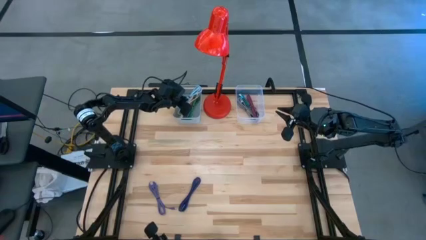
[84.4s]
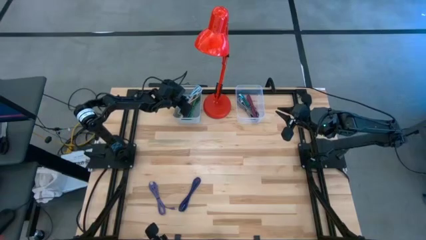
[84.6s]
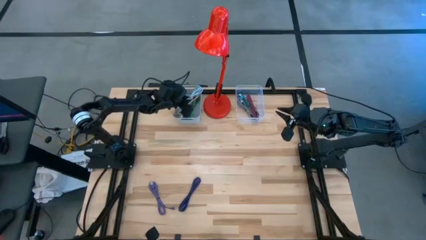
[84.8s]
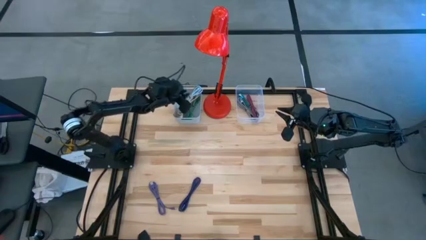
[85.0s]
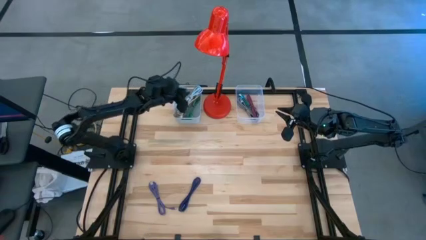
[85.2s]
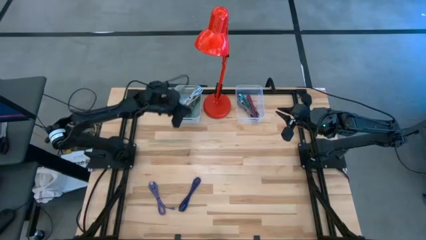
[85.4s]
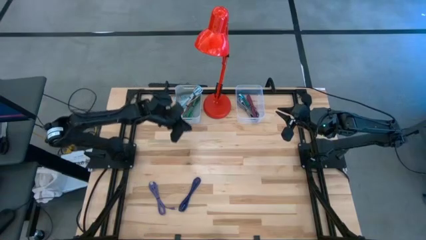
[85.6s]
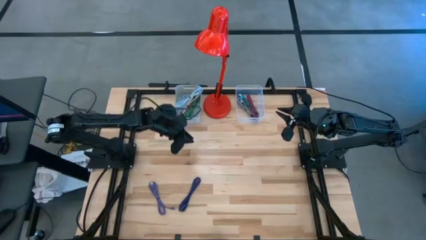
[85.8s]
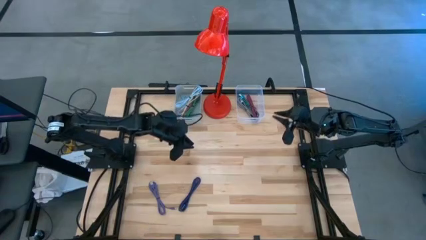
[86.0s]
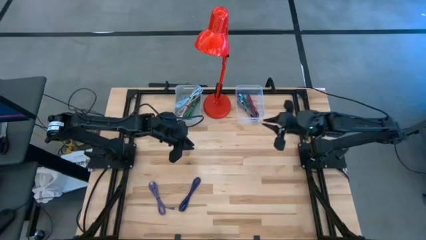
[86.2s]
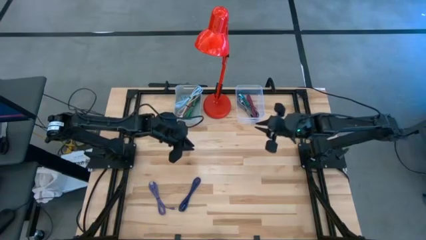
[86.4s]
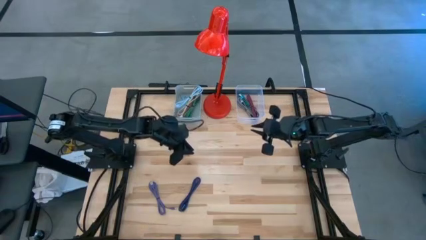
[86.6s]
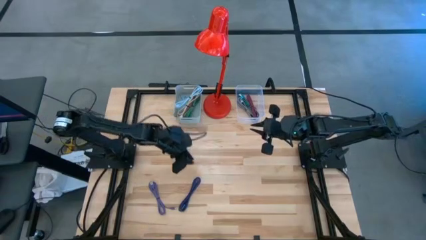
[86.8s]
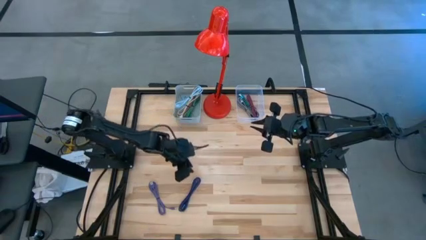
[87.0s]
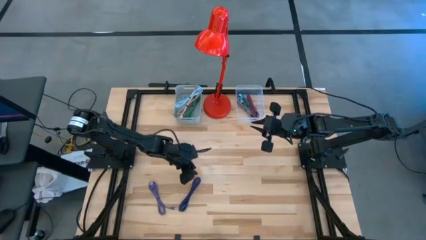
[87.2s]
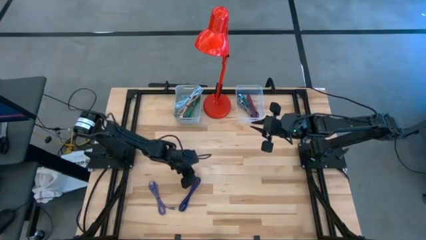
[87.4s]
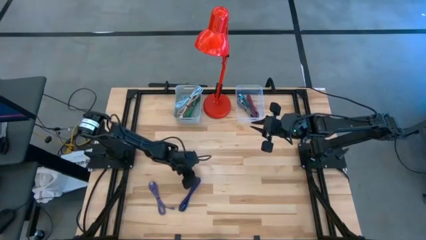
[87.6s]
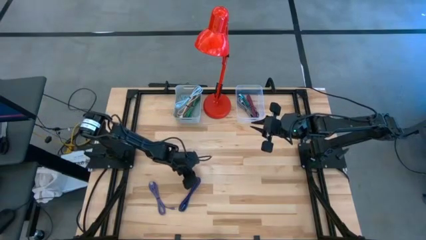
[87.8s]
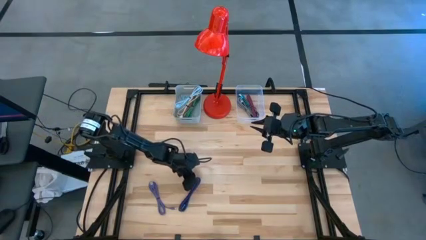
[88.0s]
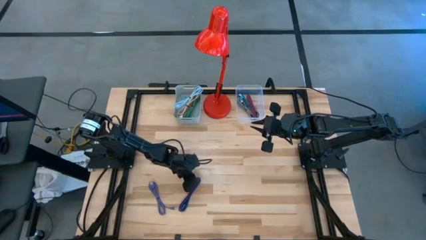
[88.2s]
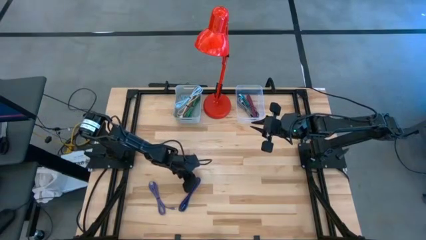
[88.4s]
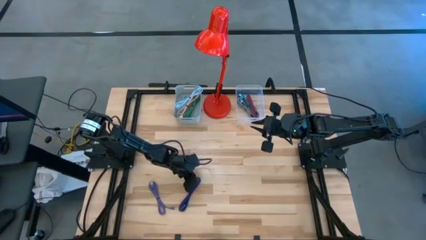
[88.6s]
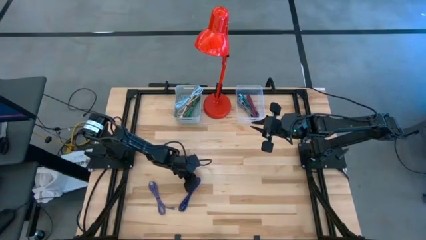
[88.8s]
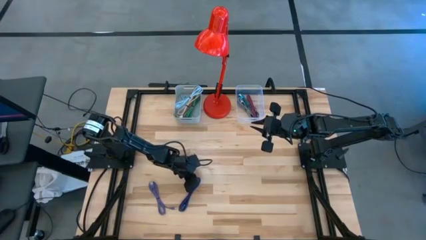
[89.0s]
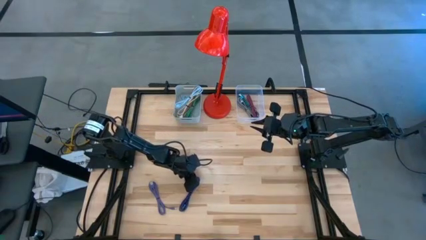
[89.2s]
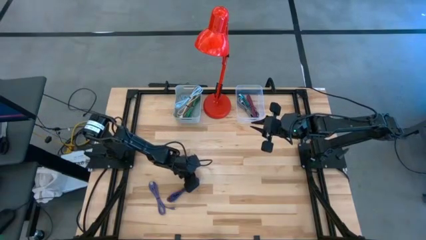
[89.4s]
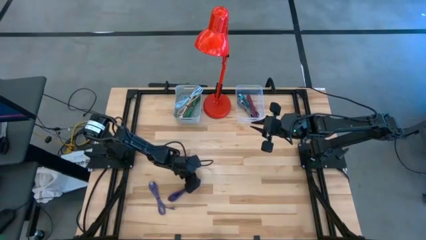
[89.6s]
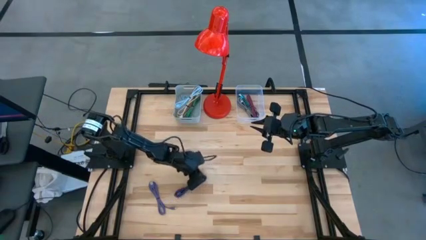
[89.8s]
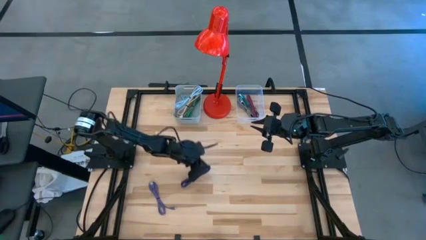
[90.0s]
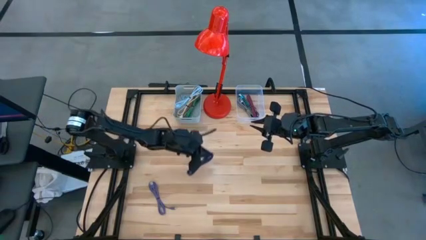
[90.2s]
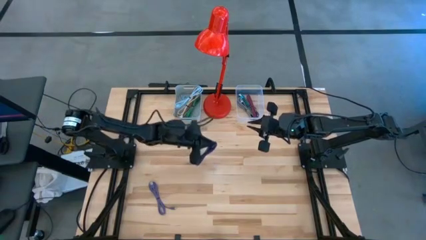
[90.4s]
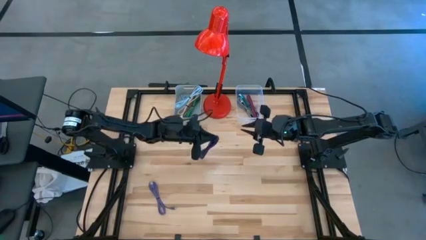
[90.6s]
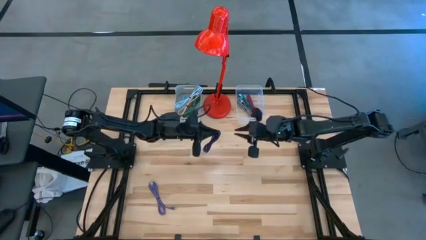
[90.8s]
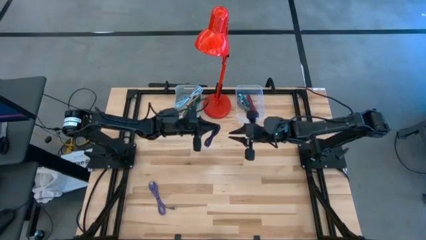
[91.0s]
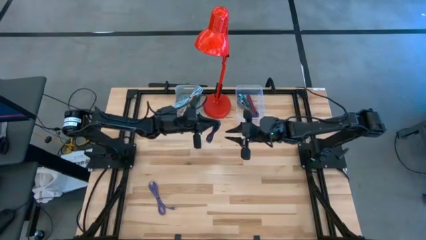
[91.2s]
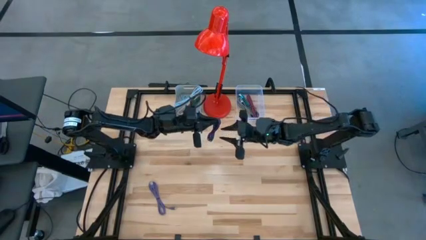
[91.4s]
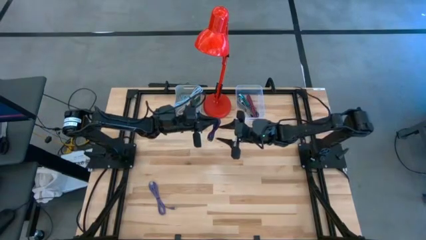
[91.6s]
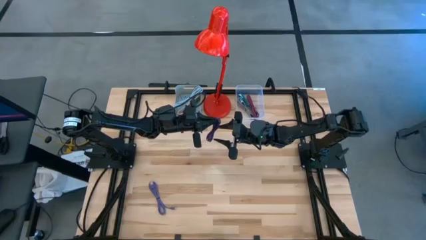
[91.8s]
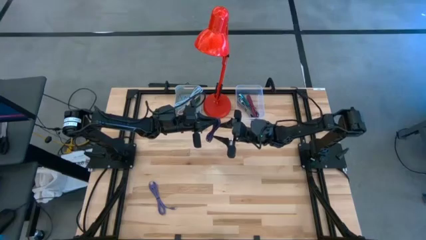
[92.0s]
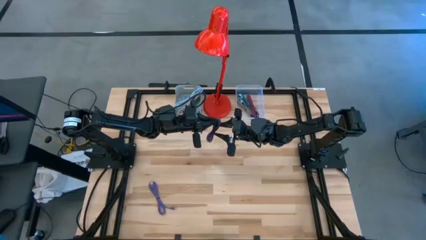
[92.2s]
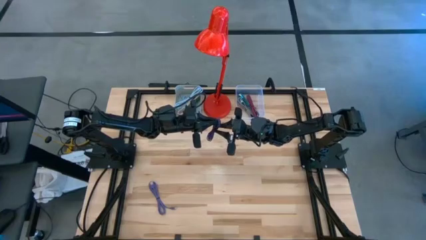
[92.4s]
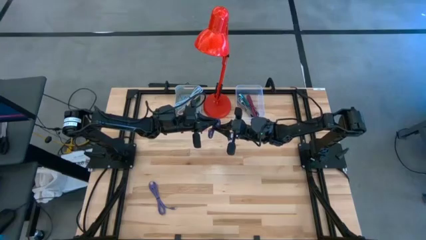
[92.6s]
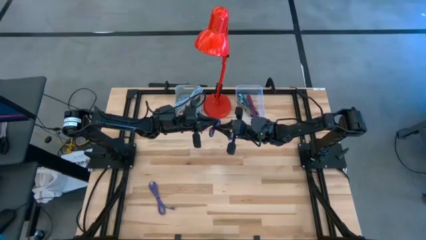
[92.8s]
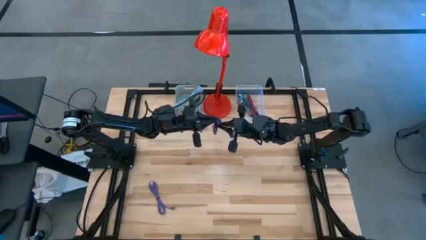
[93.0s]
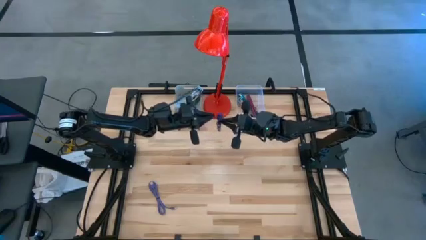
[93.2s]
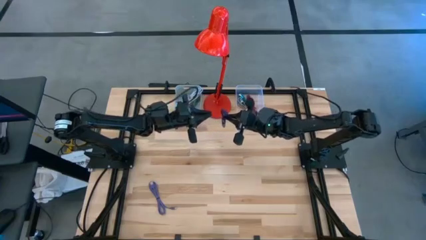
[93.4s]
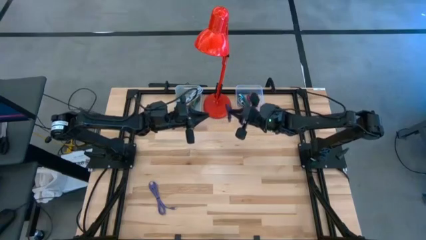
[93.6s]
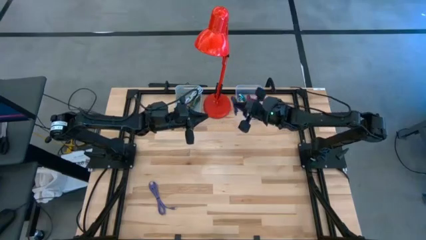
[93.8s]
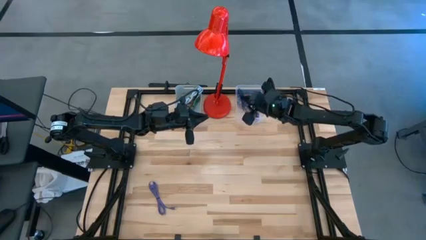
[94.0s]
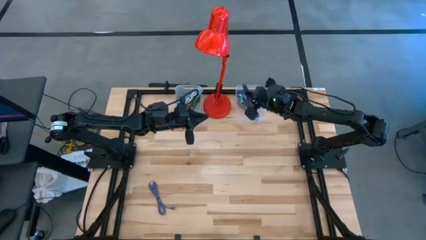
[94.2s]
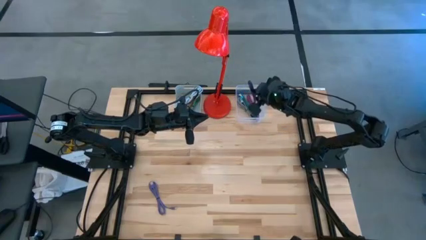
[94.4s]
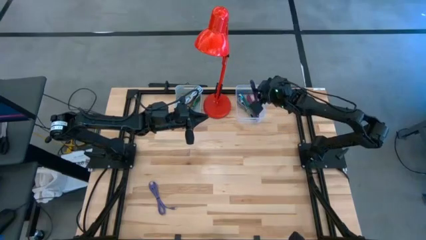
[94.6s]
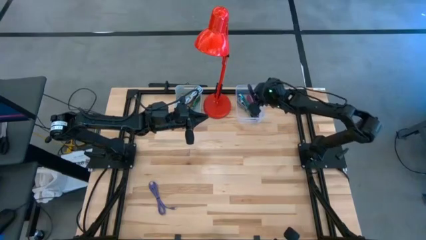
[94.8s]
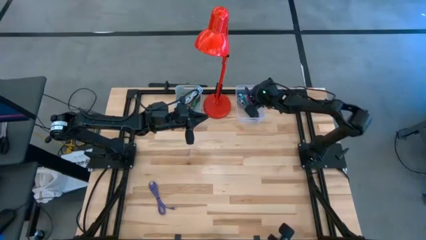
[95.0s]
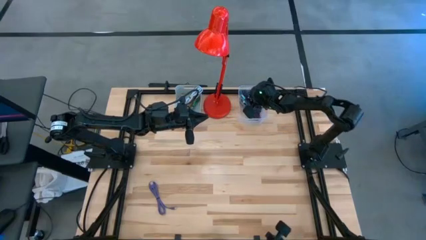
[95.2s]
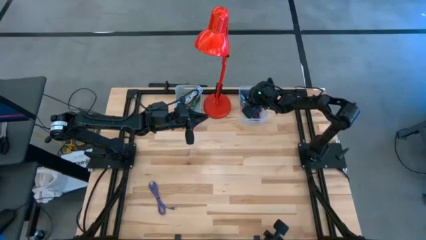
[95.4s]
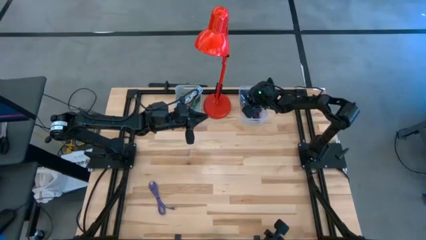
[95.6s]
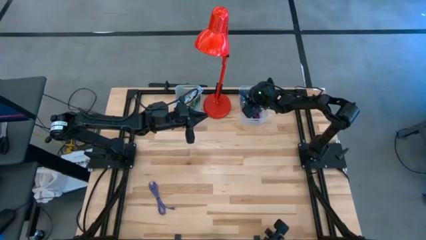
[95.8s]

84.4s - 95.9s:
Task: Pick & Place USB Port
Put the black and purple charger cable into the transparent bin

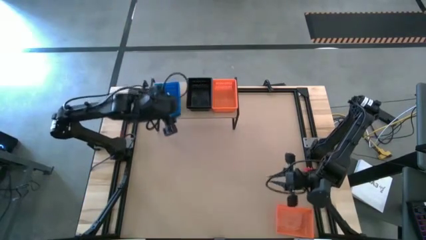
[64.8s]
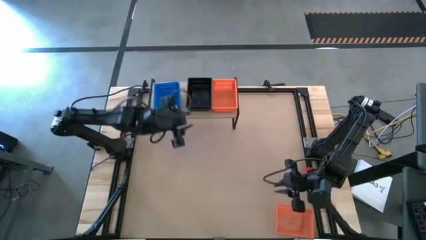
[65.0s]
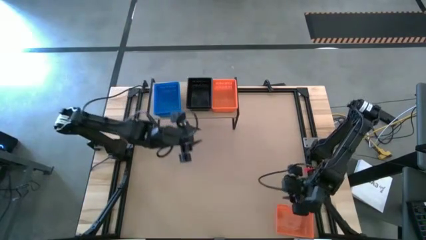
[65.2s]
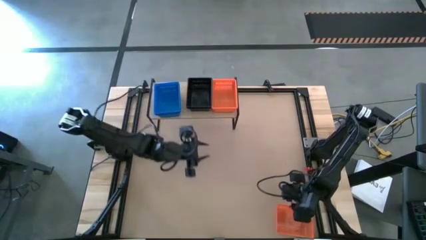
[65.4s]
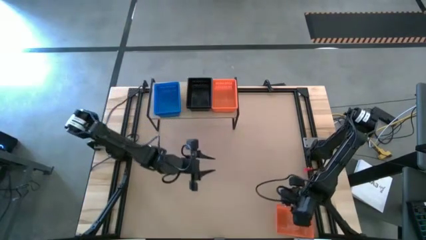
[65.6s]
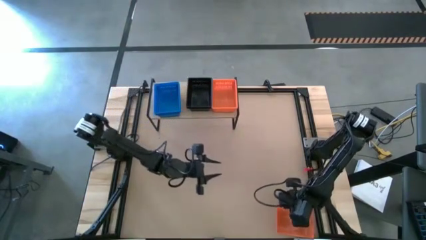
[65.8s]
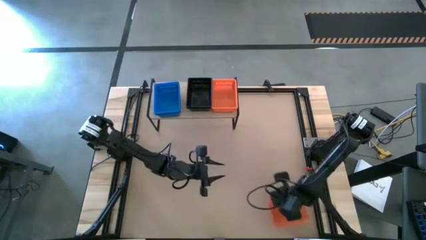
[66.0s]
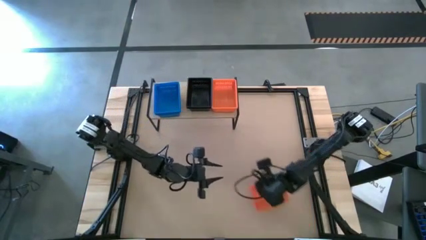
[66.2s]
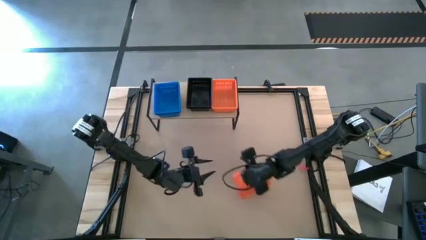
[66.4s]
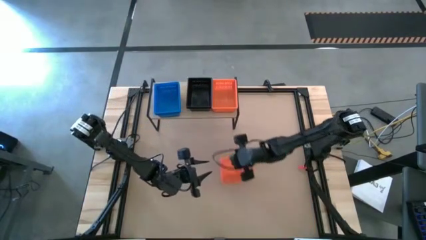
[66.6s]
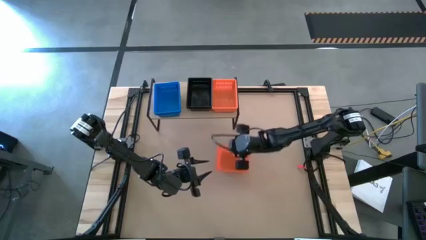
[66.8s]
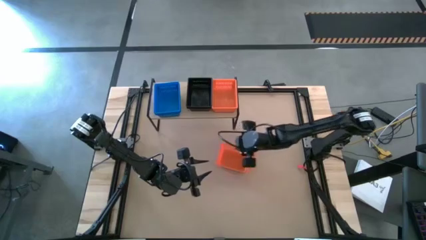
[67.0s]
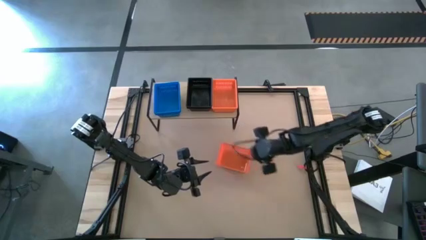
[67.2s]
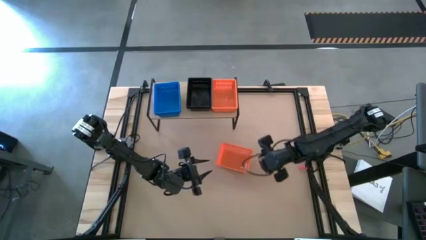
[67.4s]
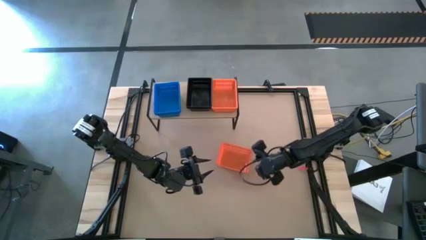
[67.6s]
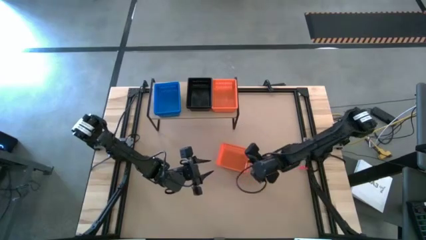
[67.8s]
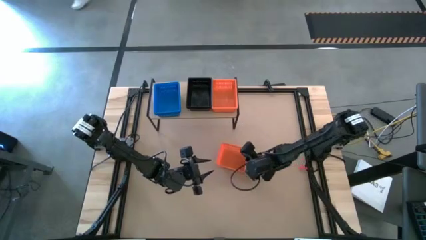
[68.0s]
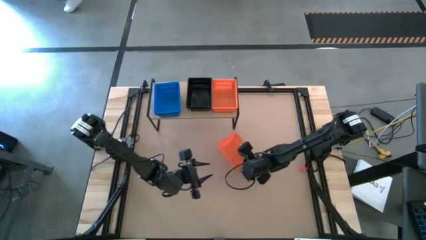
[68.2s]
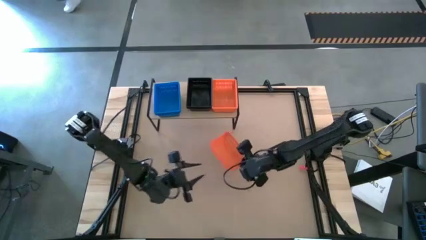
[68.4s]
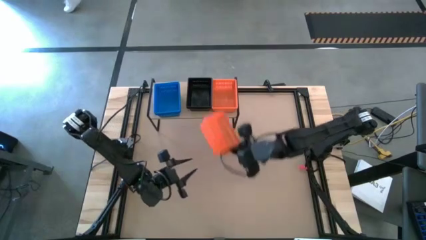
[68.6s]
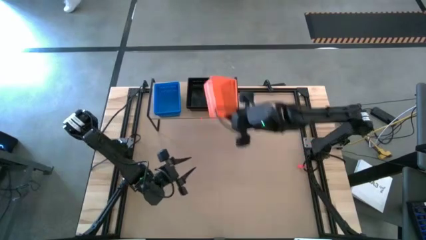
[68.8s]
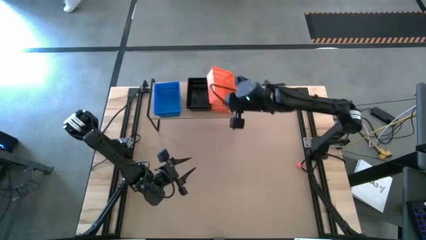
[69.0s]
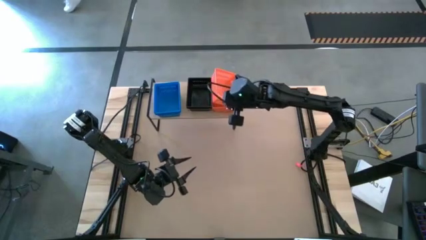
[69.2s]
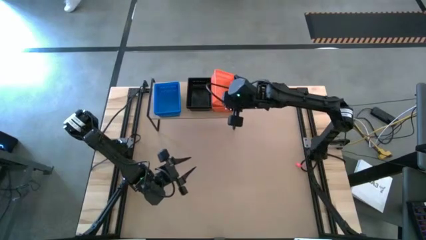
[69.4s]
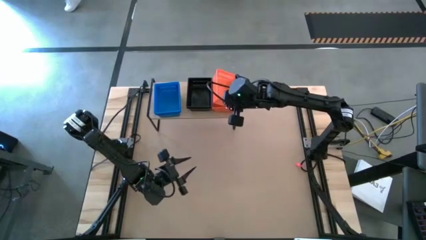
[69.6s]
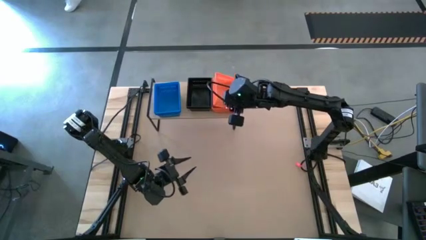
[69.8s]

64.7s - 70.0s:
Task: Stack baskets on shelf by color
Stack the orange basket on top of the orange basket on the shelf
